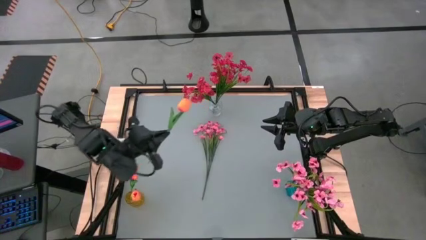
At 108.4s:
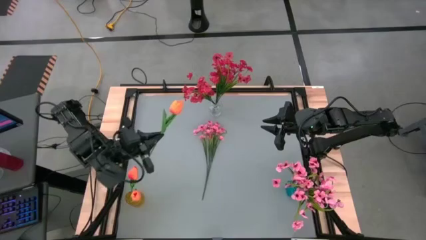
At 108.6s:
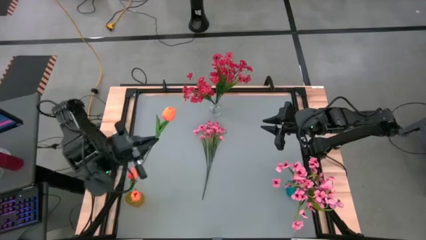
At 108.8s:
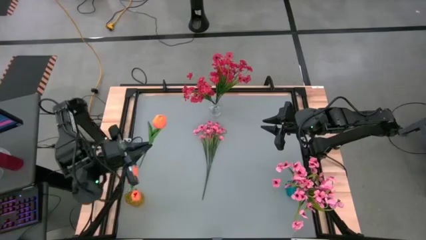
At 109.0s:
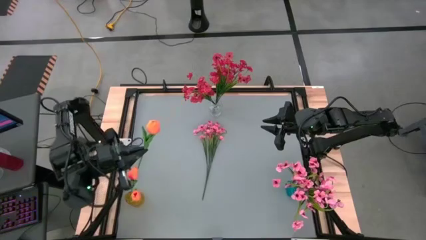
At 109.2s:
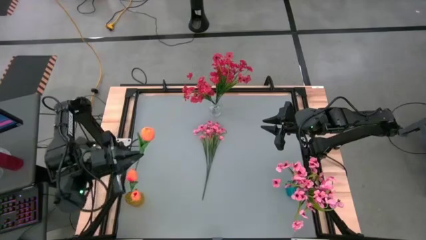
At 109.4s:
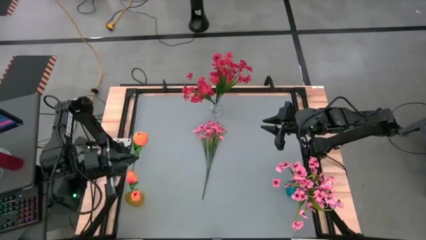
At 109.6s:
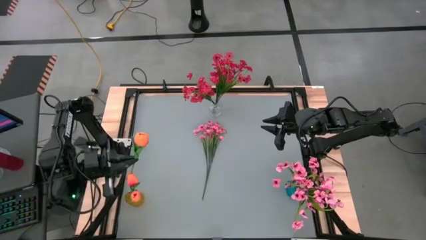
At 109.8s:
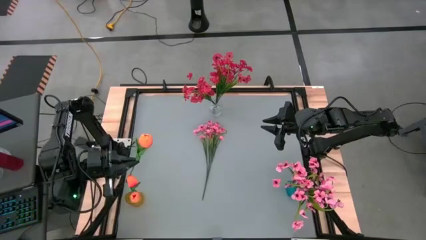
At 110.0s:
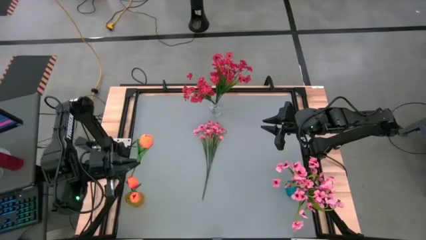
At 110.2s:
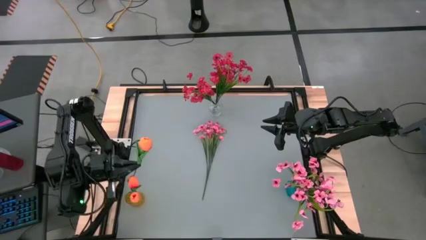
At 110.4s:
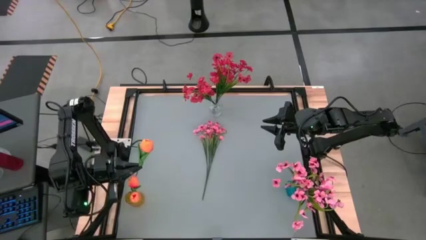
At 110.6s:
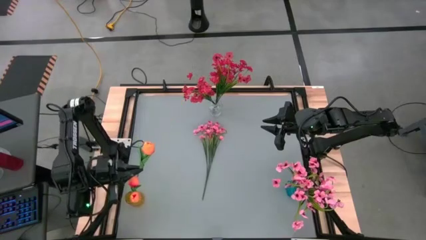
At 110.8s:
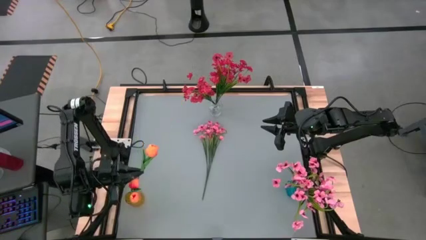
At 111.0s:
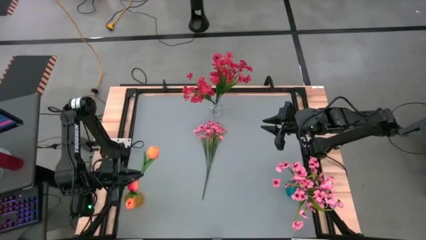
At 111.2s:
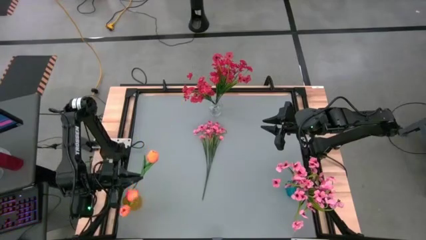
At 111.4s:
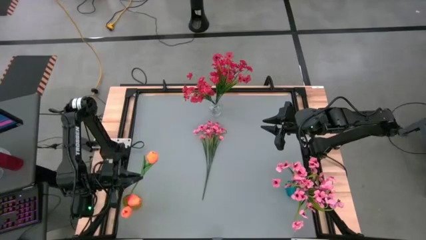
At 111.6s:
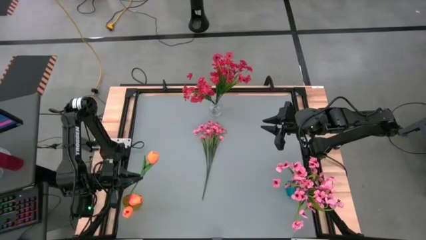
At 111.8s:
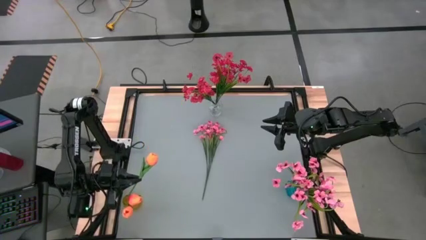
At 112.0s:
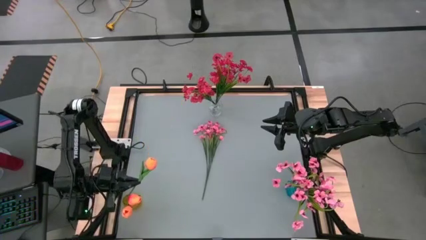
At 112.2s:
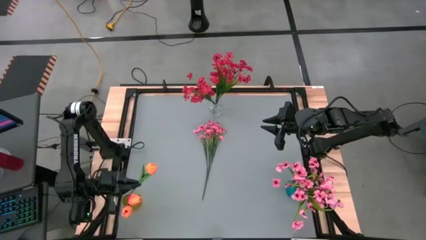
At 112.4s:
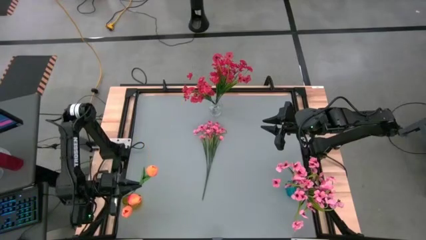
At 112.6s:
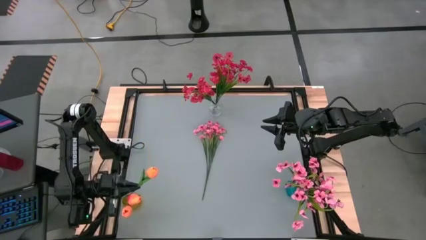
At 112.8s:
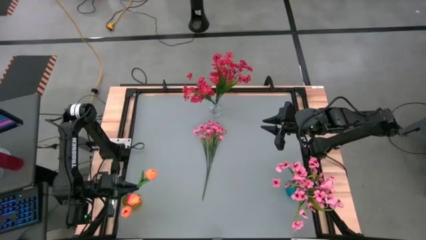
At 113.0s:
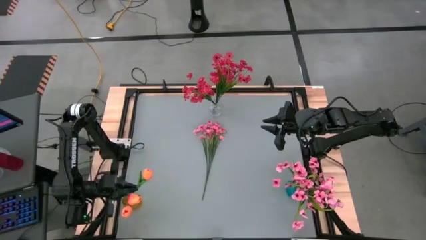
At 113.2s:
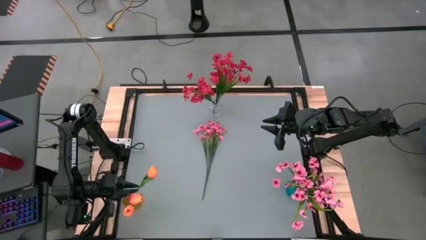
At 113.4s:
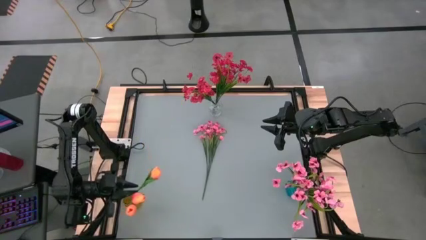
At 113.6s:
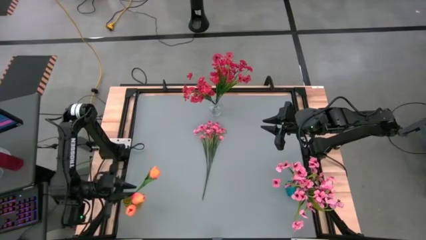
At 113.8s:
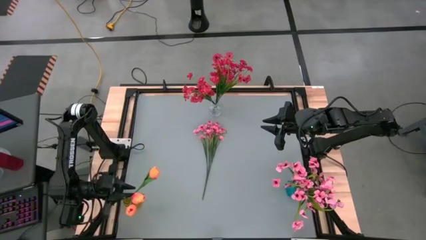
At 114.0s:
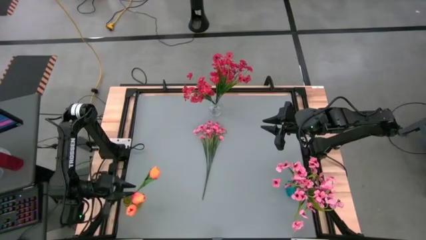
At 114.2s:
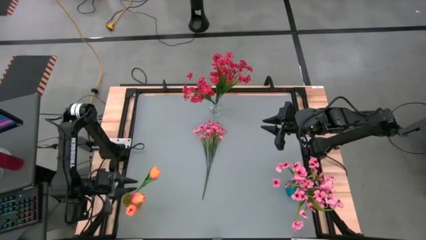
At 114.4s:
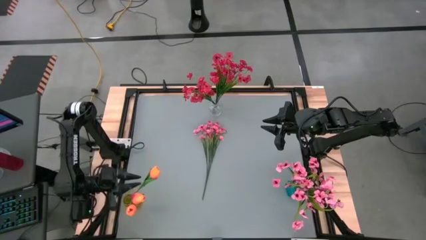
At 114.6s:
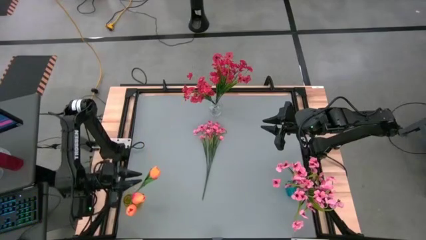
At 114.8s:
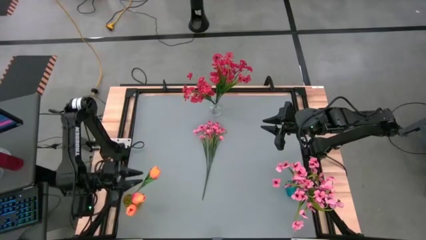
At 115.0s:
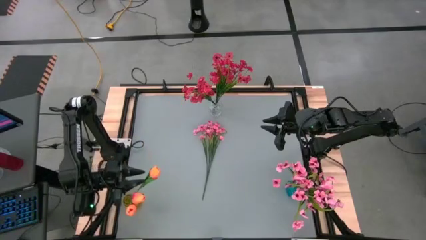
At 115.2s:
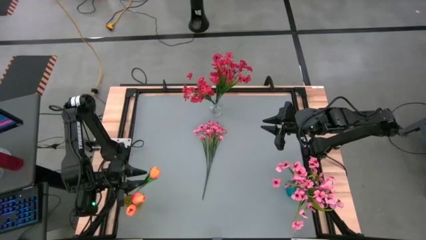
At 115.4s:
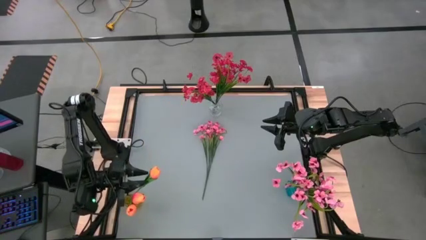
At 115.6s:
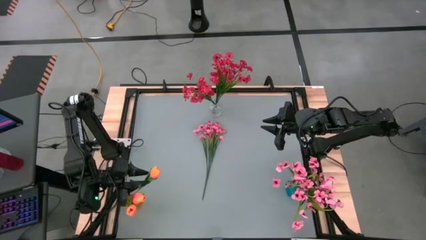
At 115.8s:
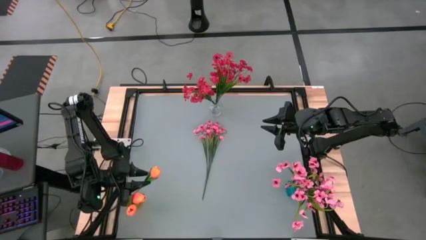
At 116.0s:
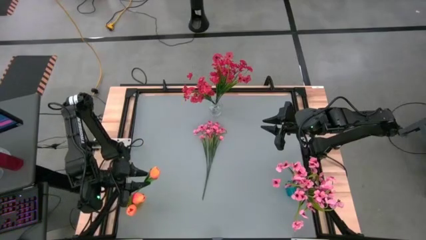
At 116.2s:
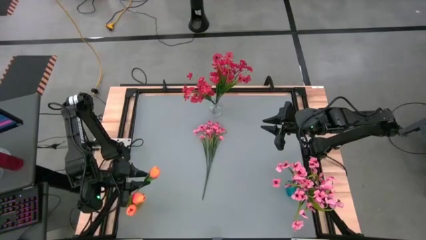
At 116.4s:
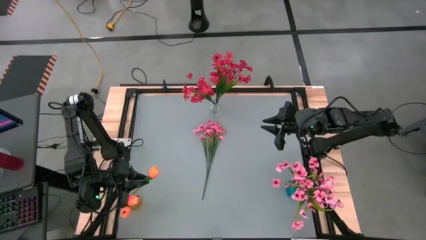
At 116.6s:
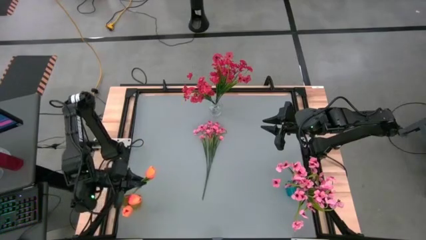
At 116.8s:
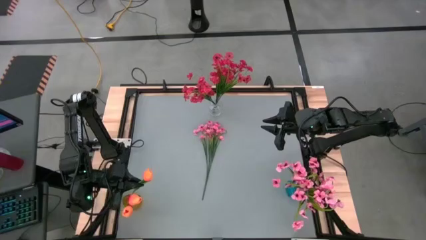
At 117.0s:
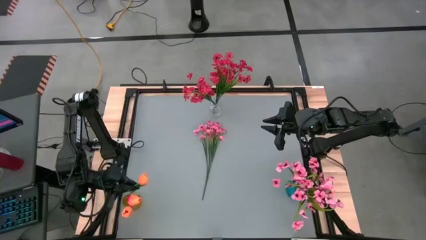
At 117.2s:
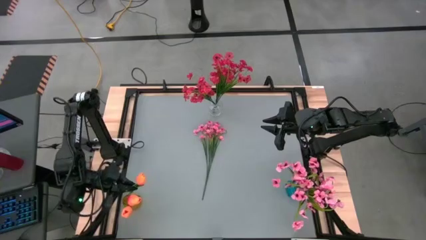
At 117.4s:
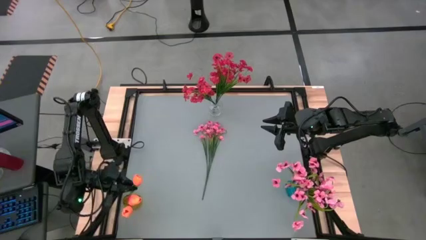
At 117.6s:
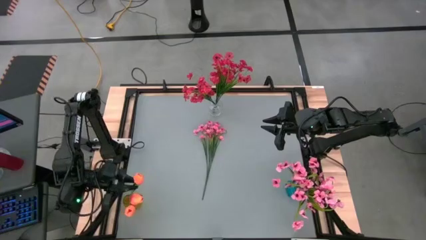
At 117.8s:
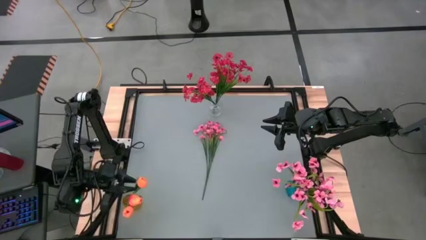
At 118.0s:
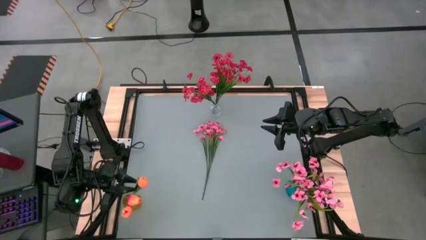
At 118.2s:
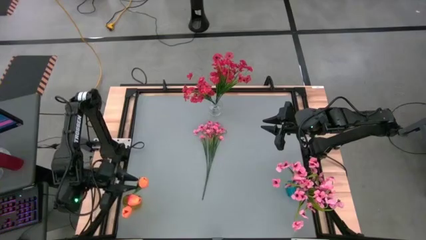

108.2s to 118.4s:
Task: Sort flowers into vase by color
Put the orange tulip flower into the yellow vase

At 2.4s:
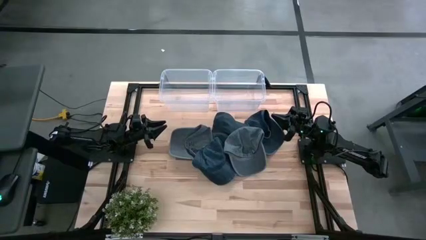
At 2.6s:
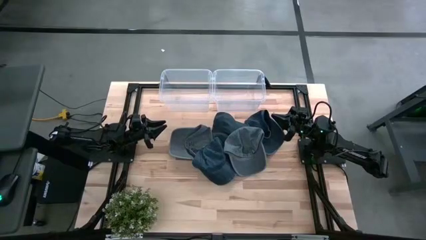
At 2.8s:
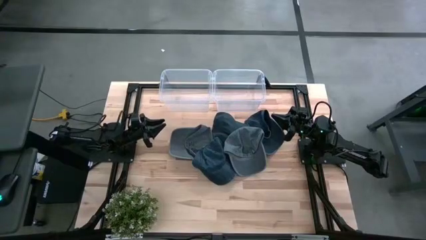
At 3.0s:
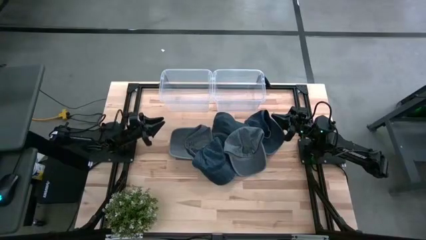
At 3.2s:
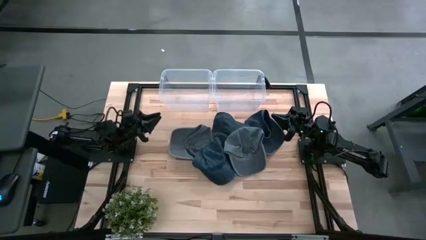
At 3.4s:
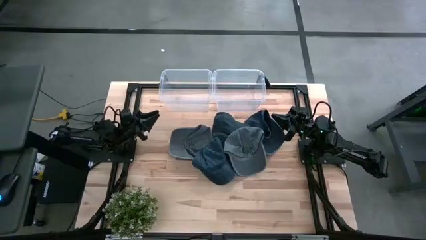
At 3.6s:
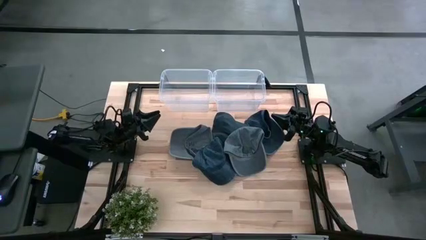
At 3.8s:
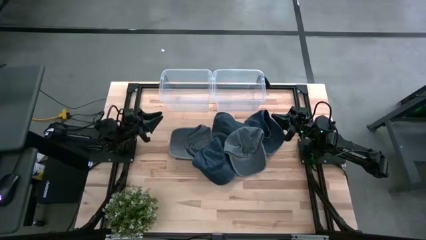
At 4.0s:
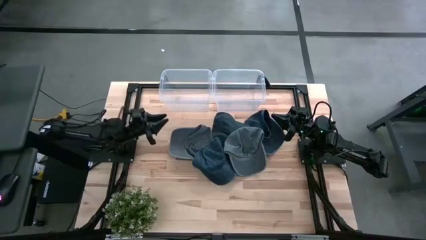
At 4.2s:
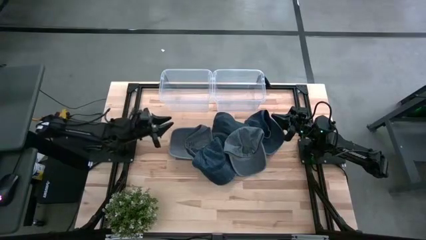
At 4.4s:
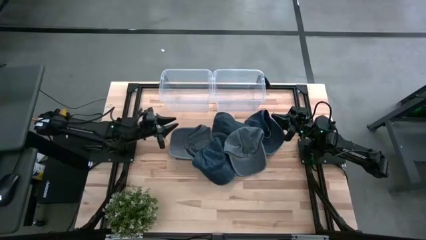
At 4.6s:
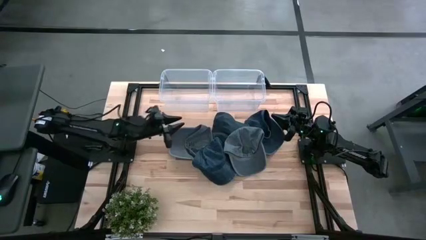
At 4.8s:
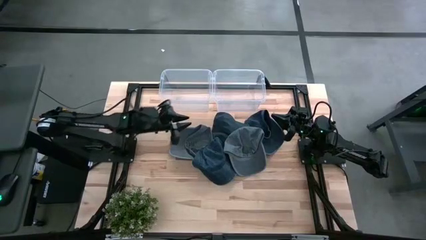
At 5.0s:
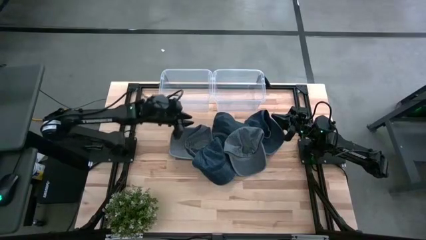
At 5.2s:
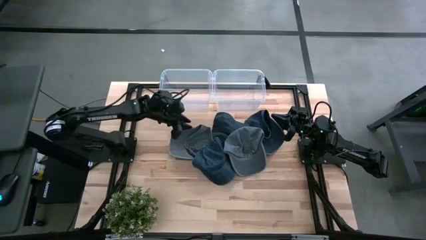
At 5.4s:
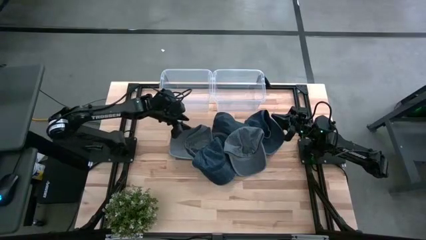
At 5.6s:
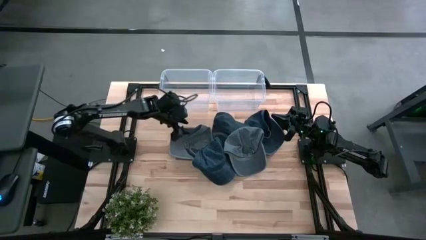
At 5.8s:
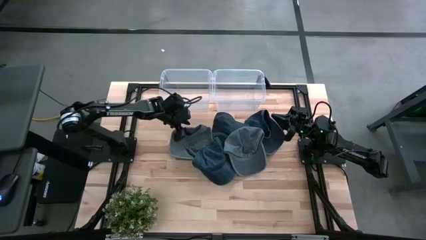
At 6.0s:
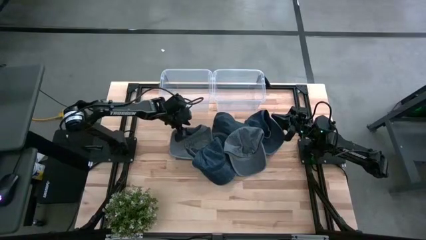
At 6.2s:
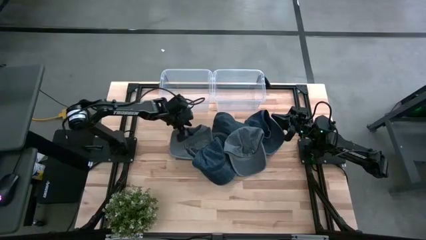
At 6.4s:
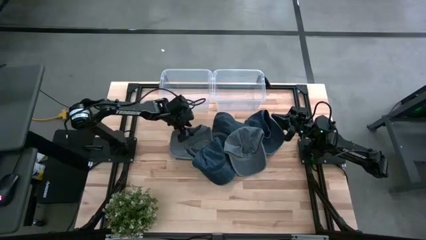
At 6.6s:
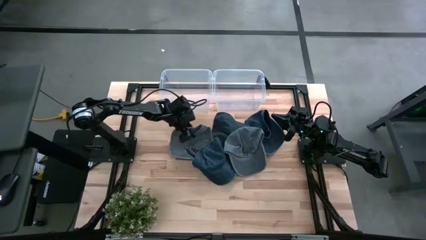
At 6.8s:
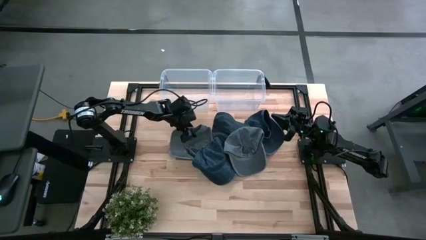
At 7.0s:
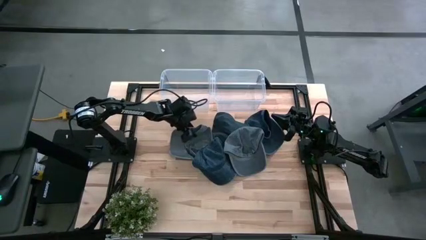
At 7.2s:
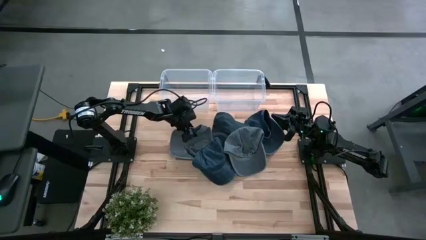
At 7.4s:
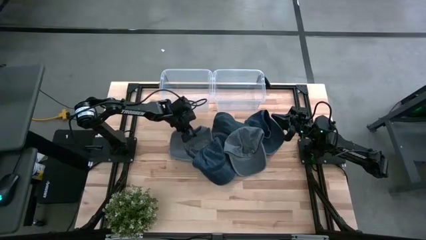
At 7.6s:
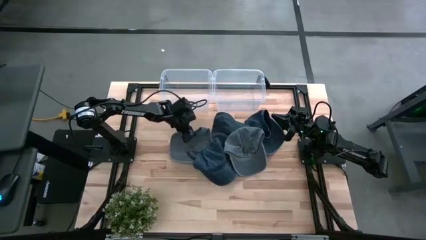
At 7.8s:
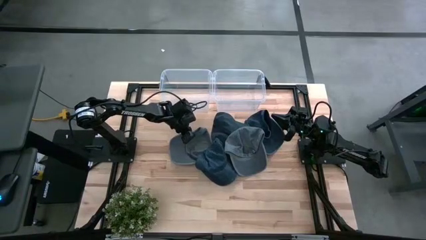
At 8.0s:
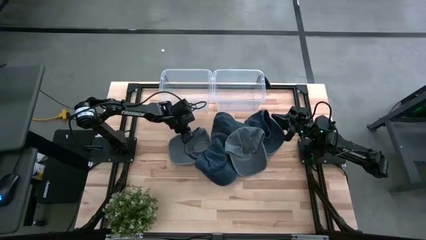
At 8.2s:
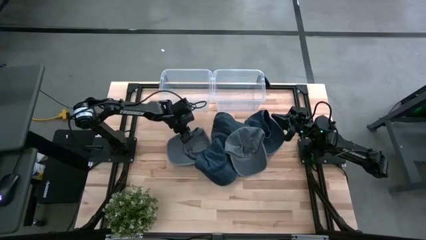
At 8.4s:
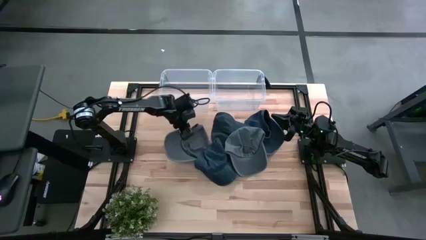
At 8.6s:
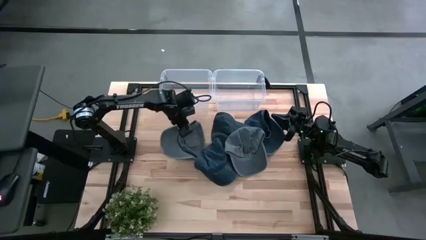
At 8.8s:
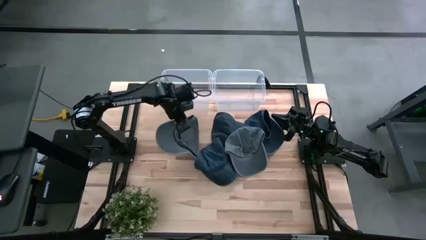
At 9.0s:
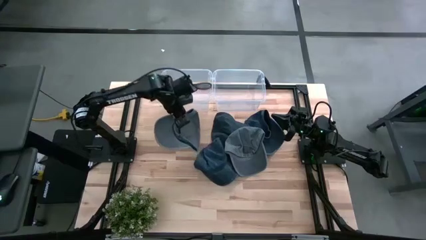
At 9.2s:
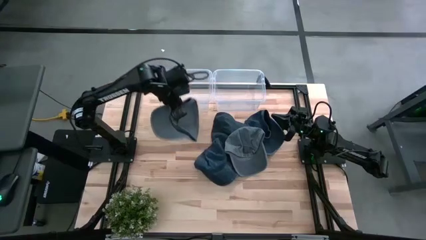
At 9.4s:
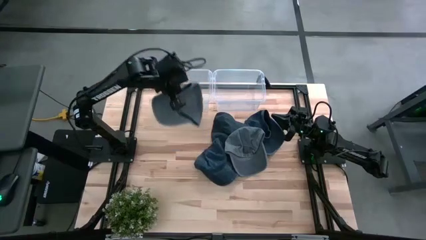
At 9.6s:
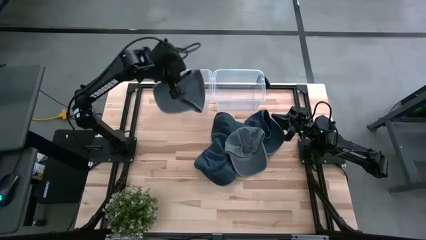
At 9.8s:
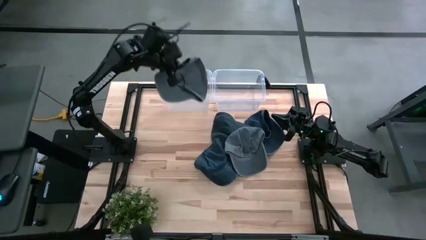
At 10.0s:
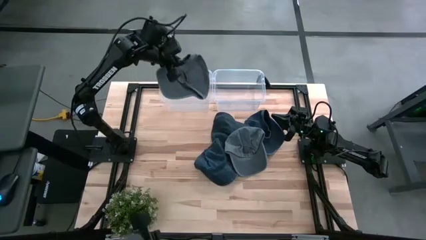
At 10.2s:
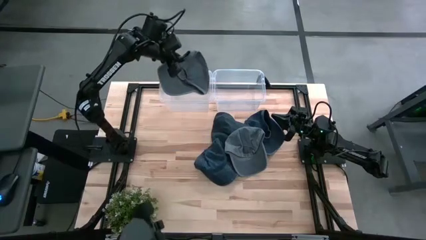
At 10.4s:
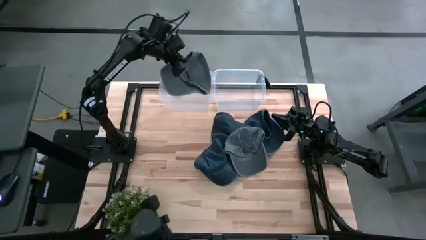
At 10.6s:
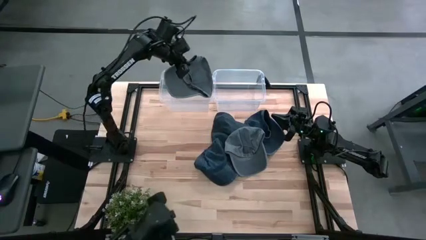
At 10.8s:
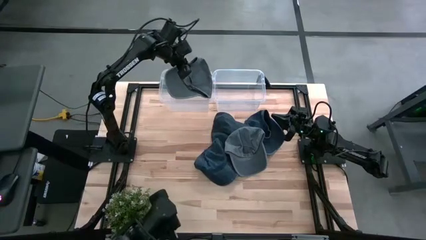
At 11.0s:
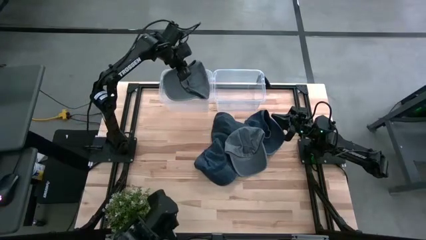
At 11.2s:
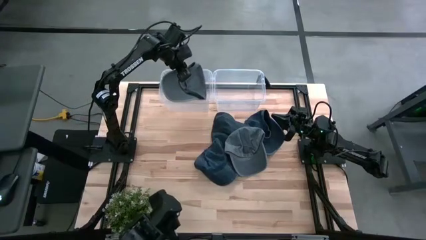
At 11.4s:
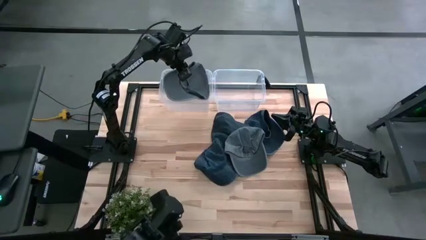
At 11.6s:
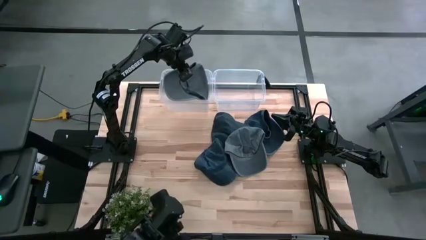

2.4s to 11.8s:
Task: Pick & Place hat
Put the left gray cap into the left transparent bin
